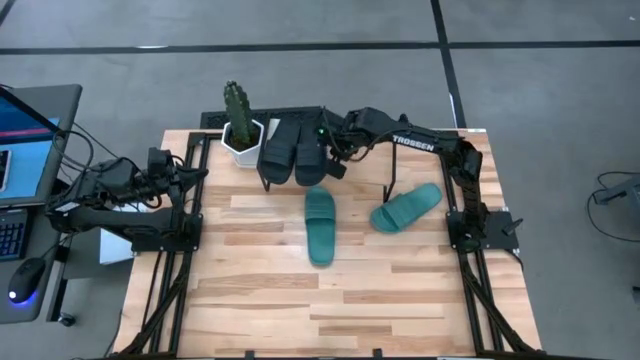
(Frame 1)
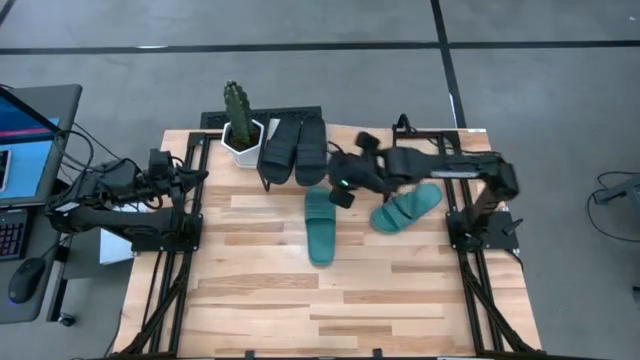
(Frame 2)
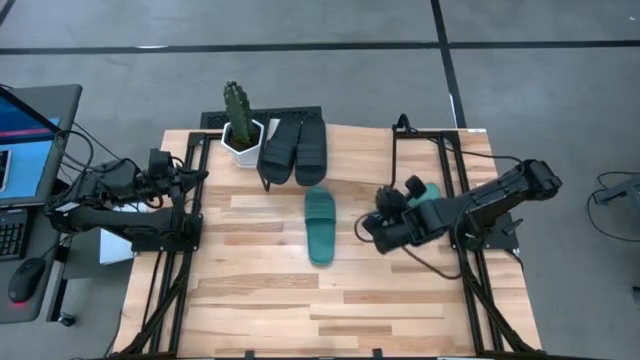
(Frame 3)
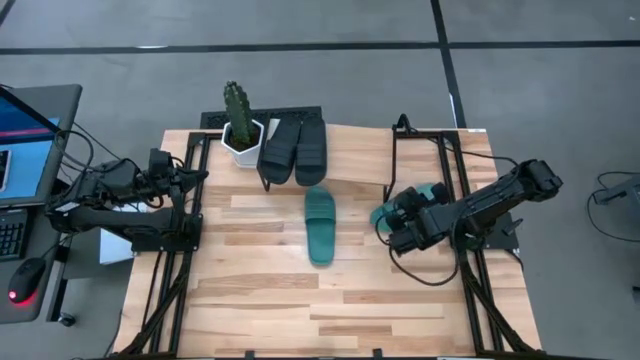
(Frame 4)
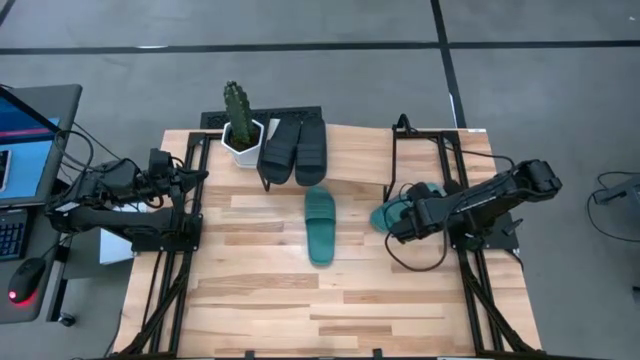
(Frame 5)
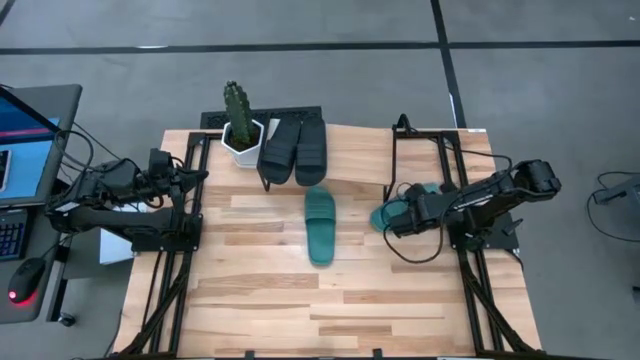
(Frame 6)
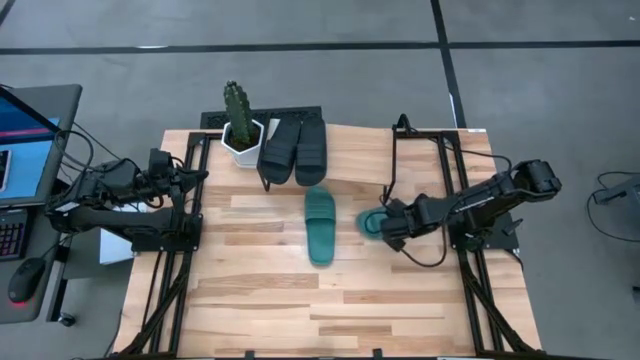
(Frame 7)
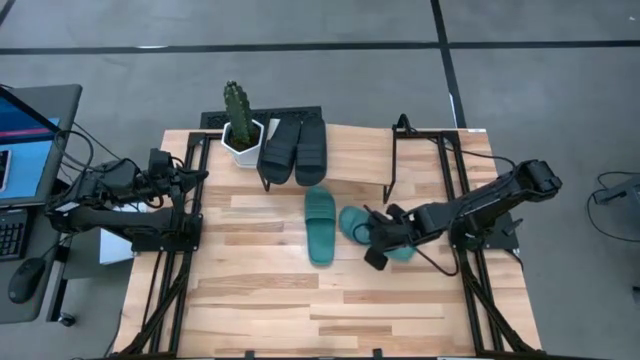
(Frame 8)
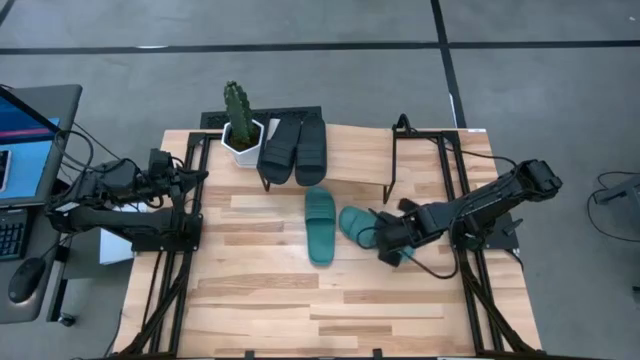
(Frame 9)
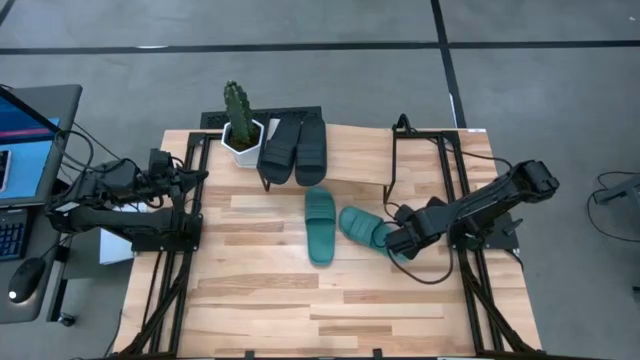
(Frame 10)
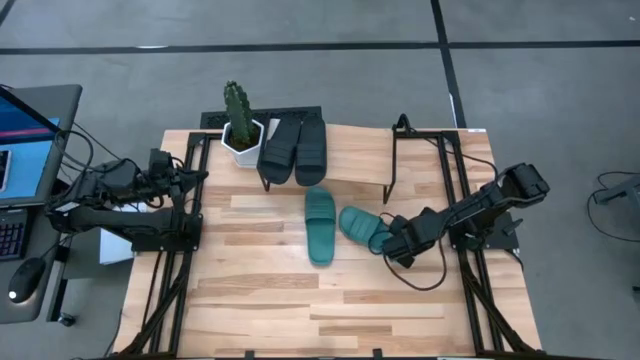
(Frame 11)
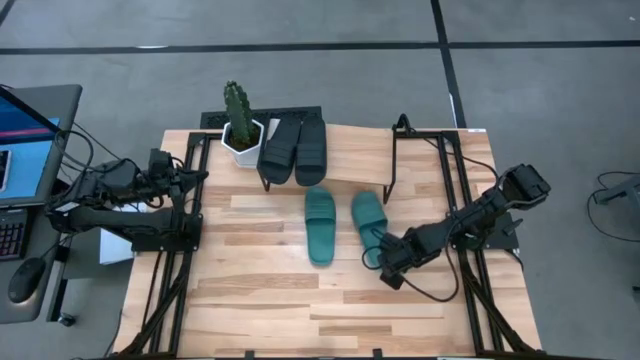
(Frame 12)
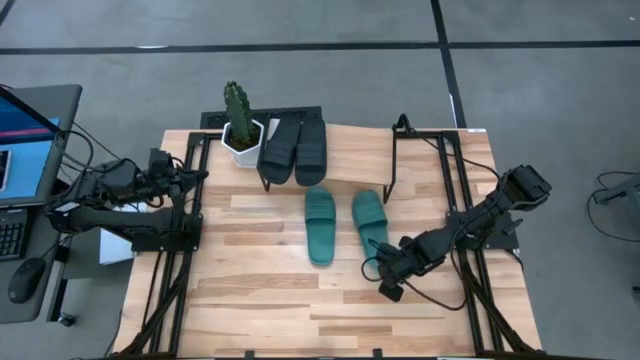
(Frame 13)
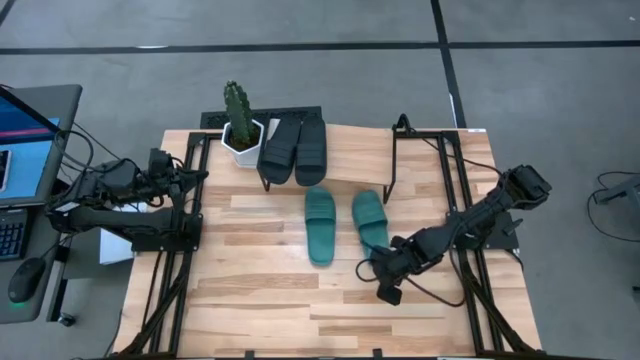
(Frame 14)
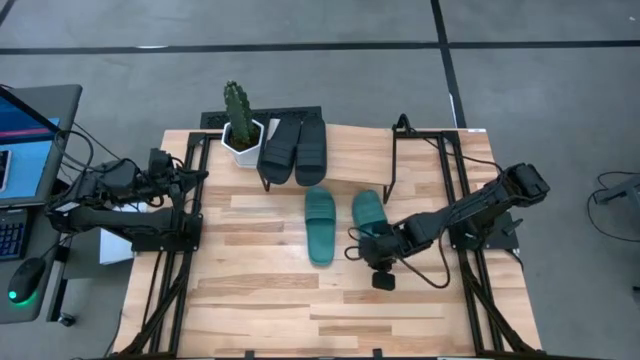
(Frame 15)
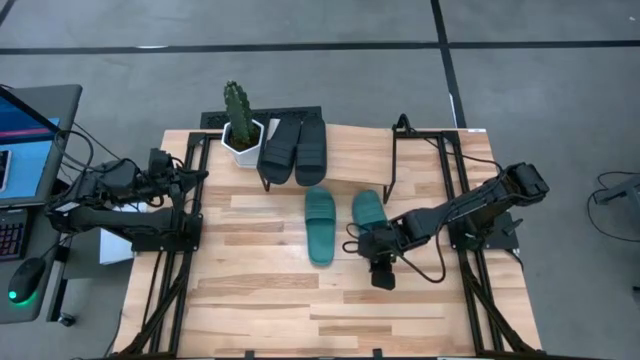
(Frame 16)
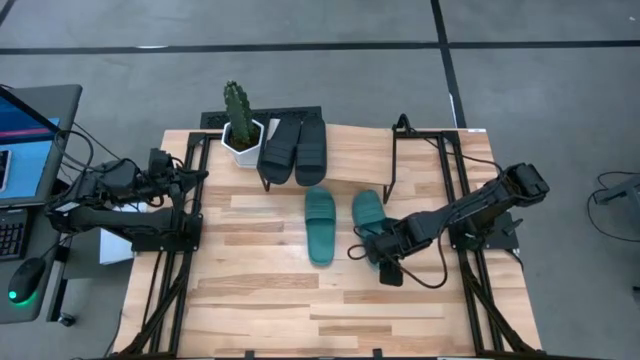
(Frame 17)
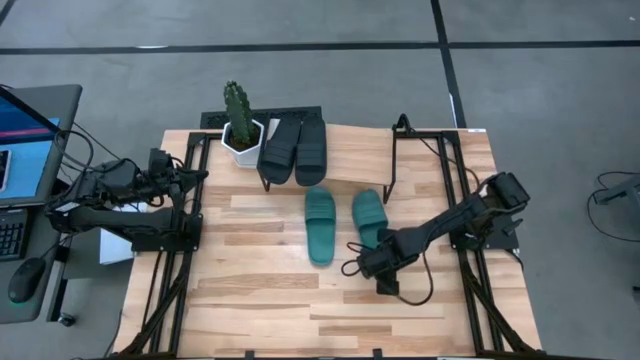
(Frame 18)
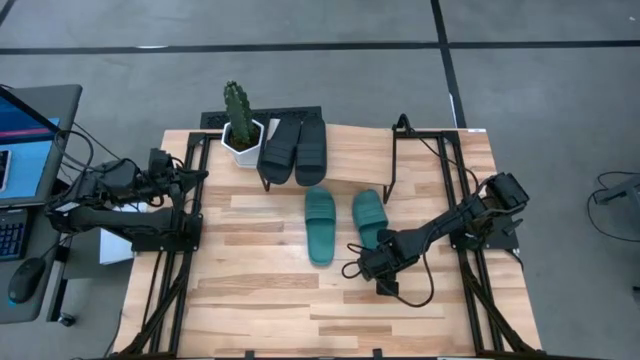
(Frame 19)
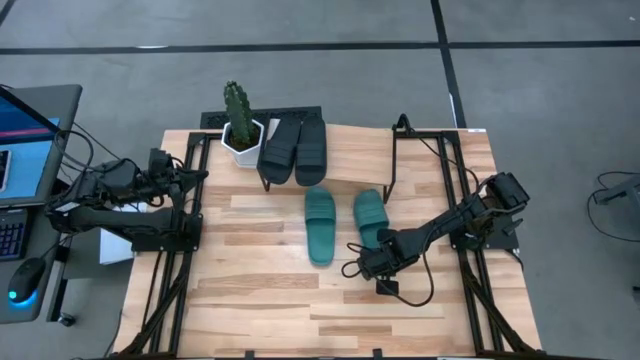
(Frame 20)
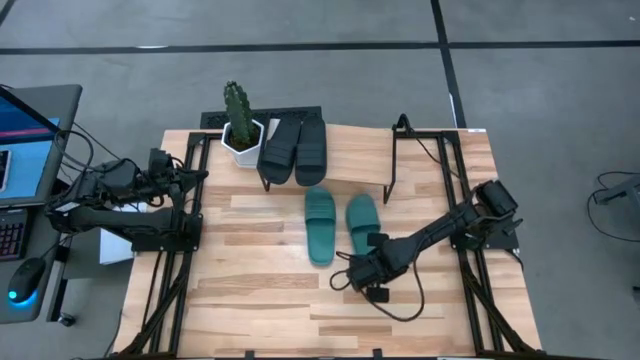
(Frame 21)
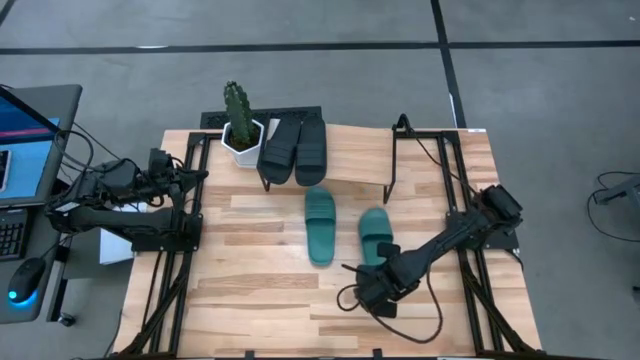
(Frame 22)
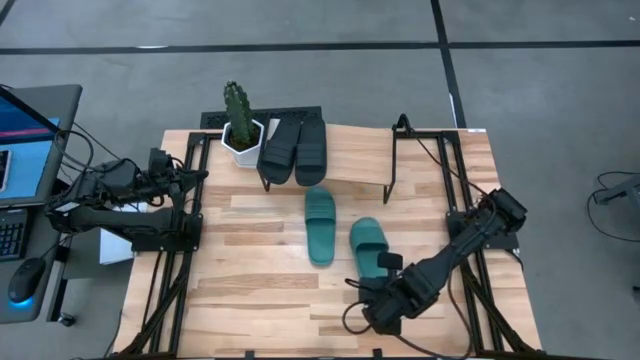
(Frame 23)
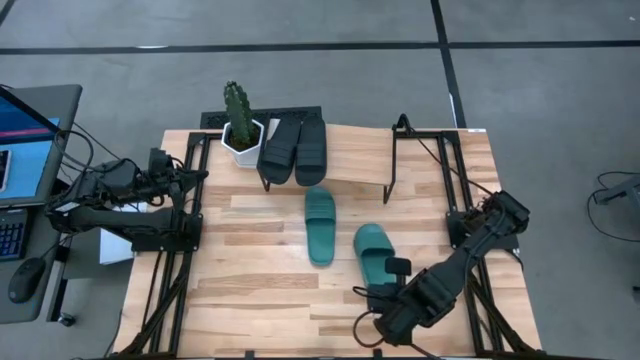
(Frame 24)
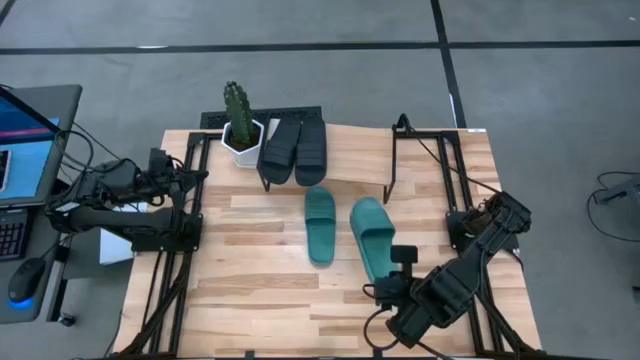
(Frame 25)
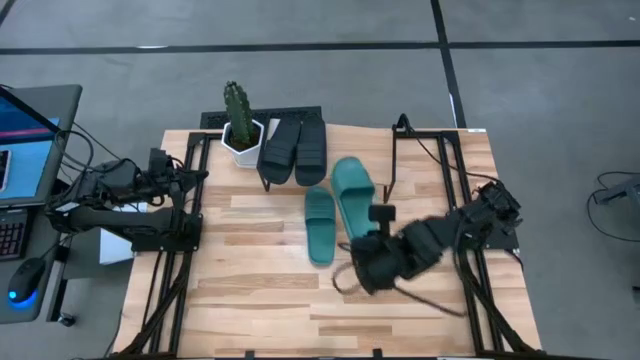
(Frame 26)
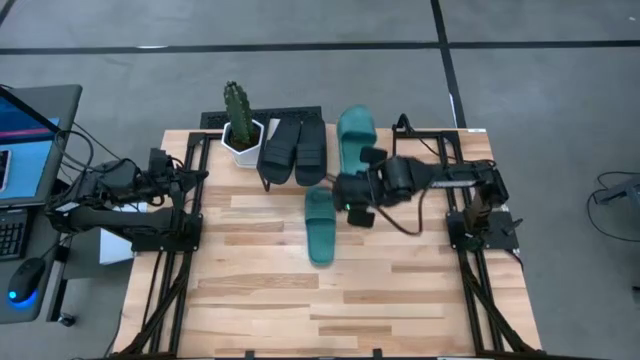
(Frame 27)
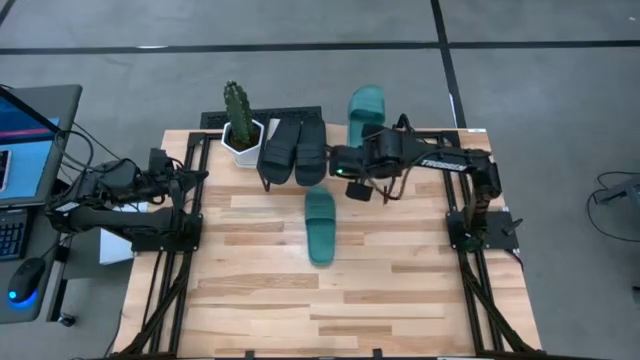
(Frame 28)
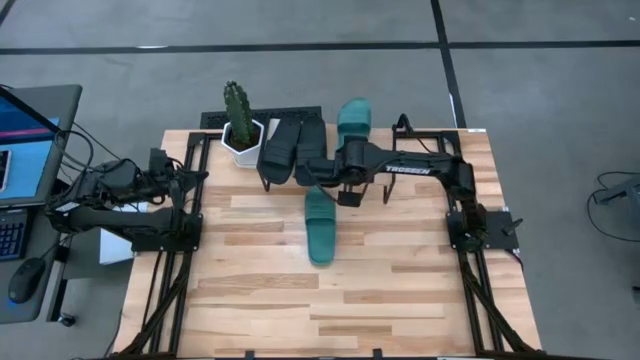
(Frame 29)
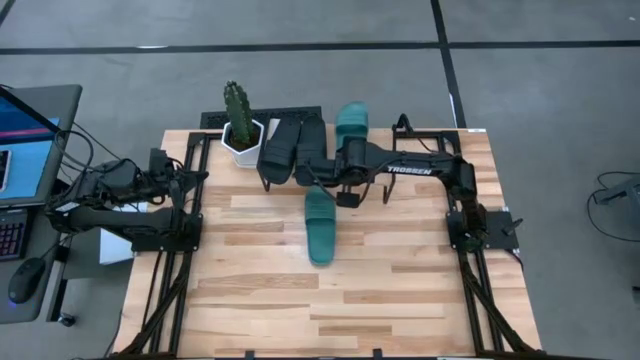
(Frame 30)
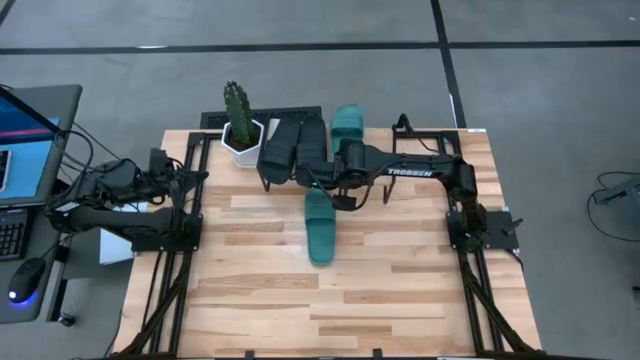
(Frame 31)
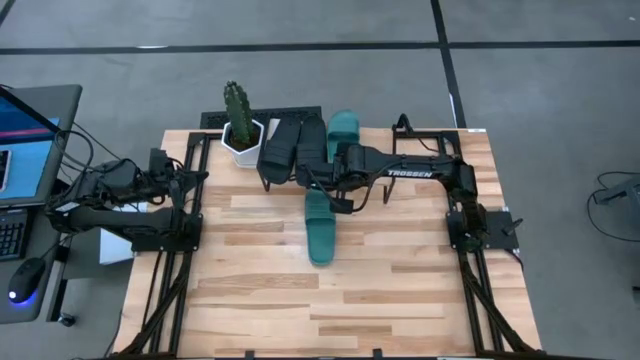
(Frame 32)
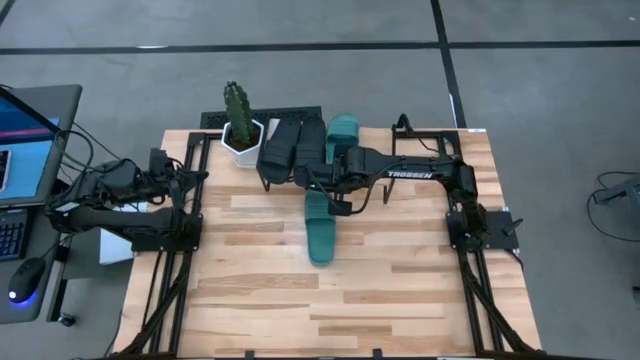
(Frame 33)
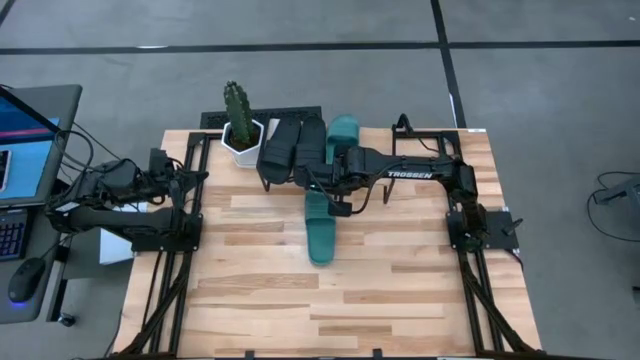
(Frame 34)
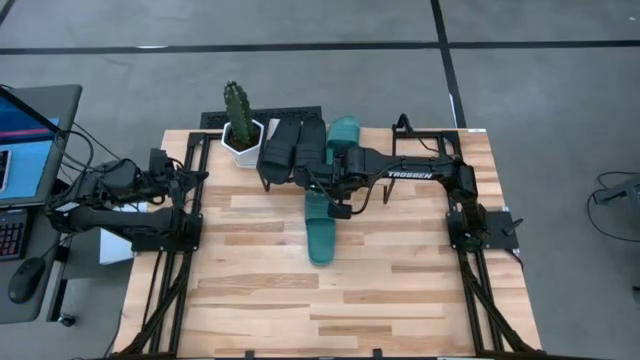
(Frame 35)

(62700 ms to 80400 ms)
Task: Pick and place slides into the shelf
Put the right blue slides on the shelf

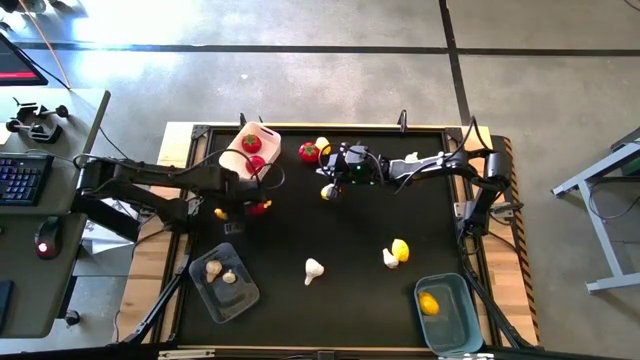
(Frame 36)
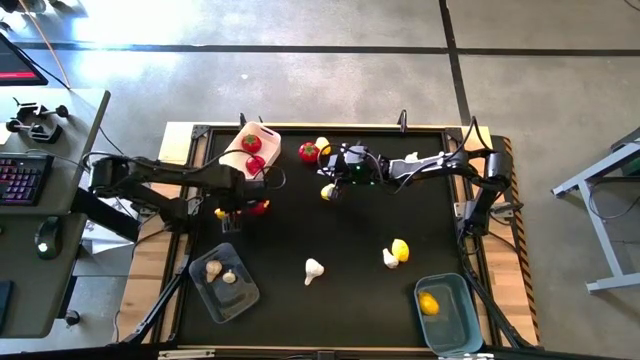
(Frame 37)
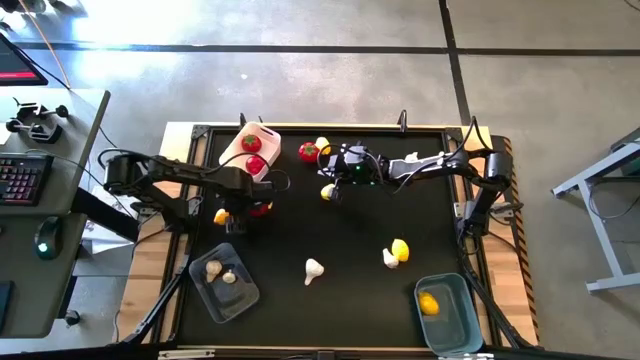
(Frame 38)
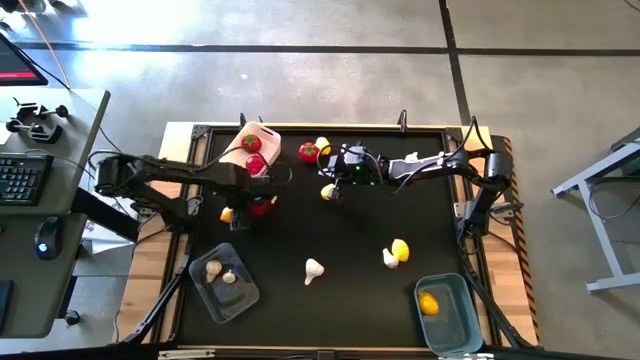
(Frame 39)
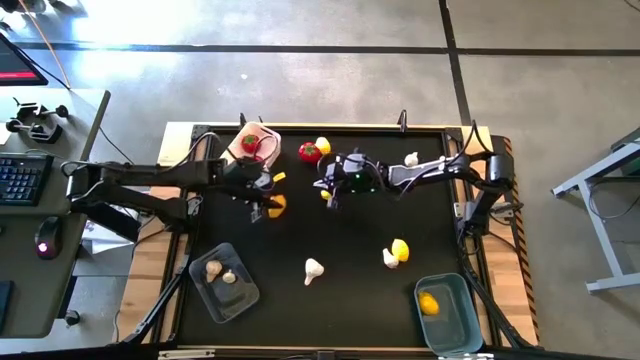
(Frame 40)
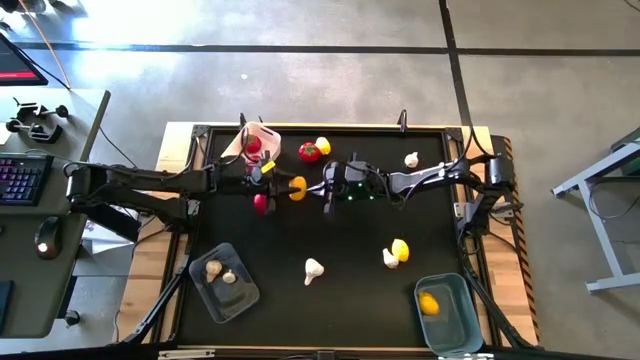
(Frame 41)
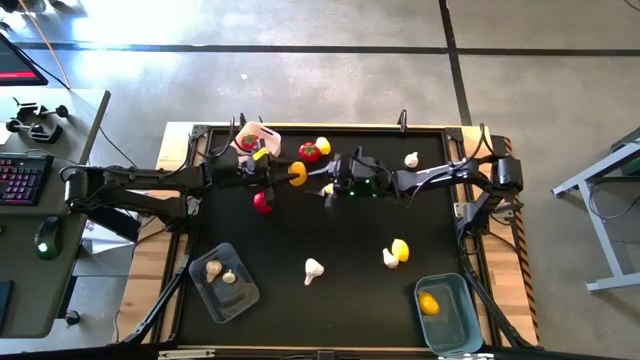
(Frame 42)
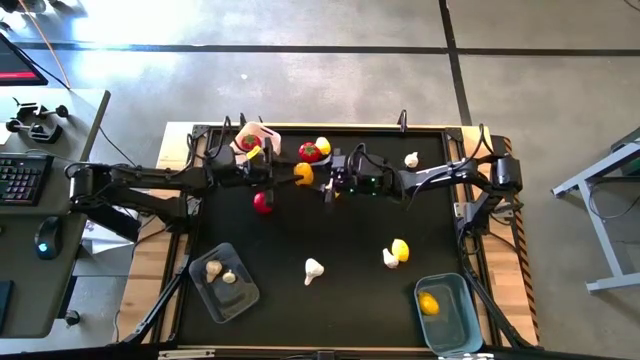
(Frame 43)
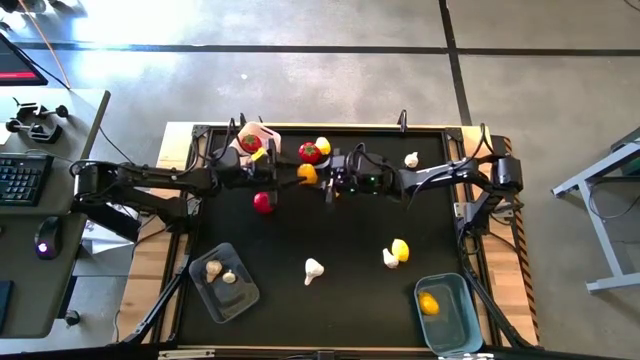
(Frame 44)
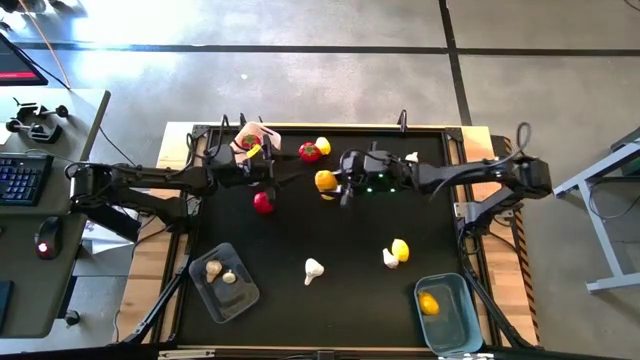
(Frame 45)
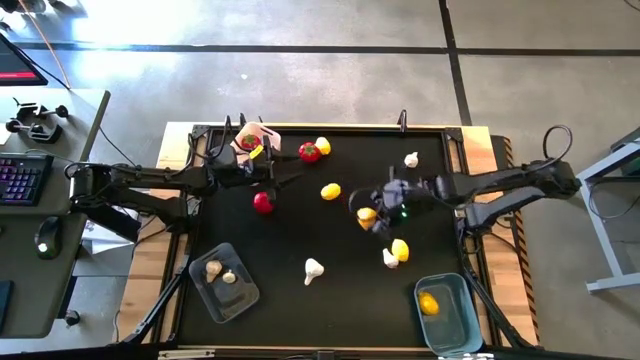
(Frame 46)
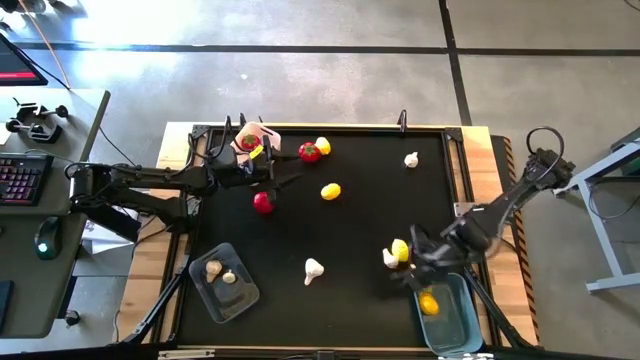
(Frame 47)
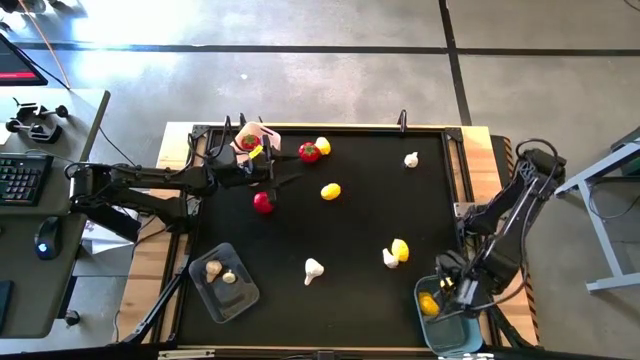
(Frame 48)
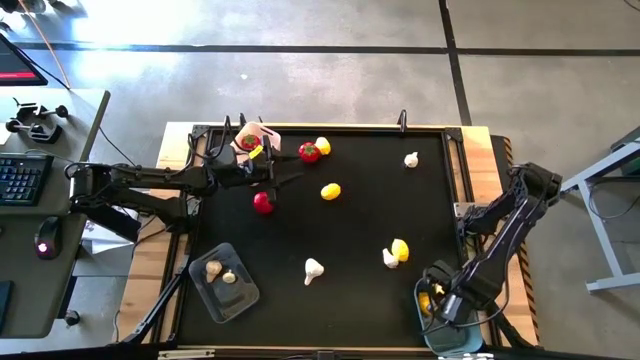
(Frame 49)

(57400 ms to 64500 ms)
Task: Sort produce into baskets
Put the yellow lemon into the blue bin
